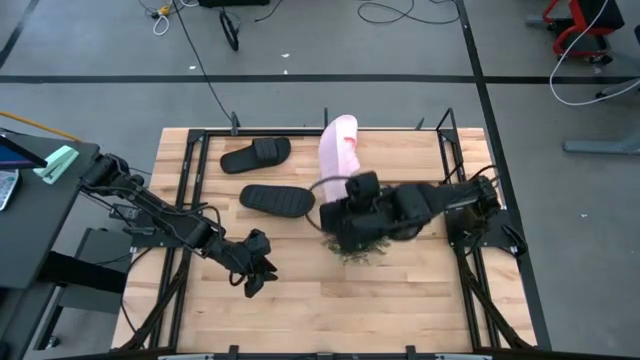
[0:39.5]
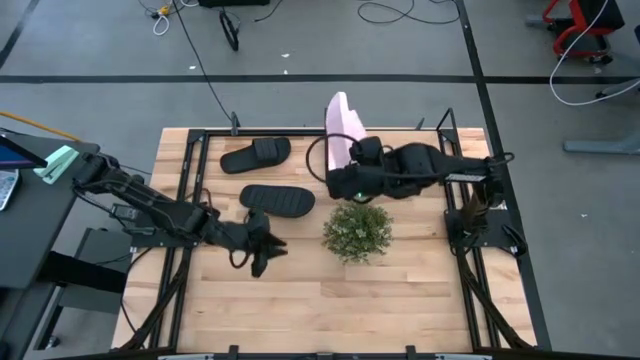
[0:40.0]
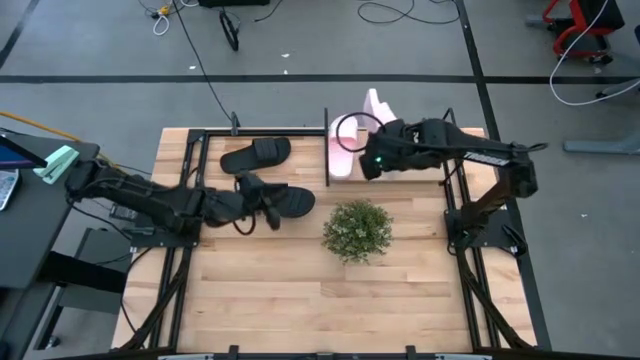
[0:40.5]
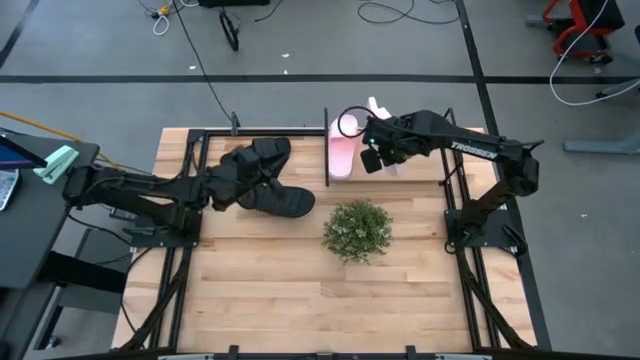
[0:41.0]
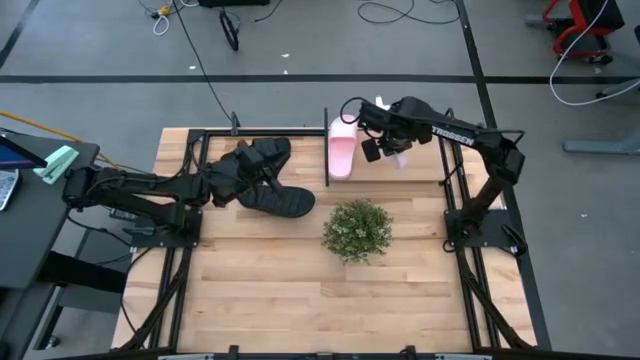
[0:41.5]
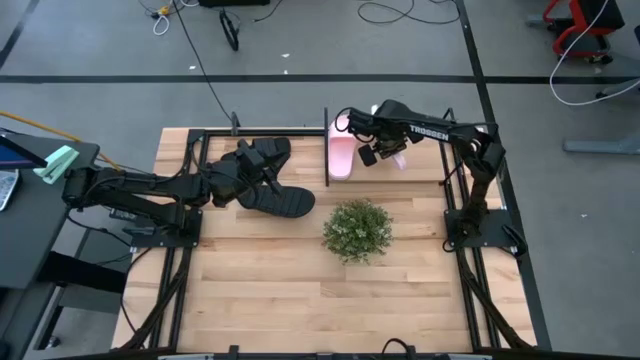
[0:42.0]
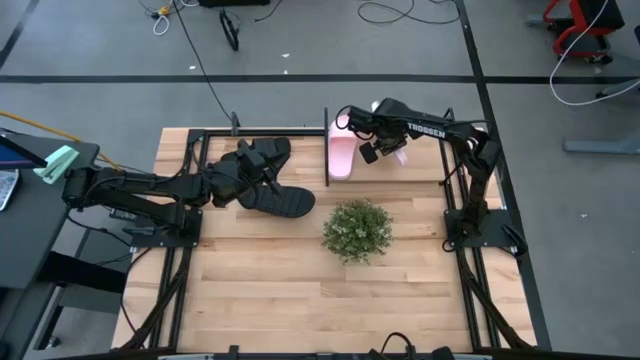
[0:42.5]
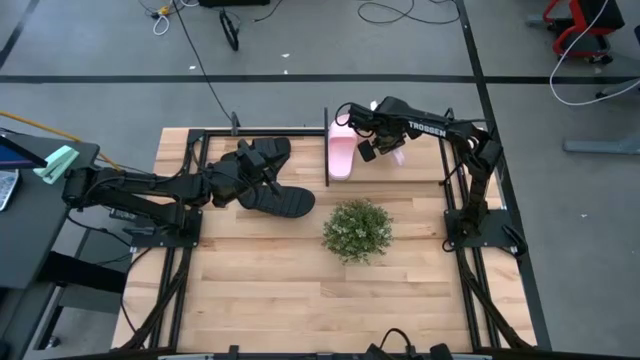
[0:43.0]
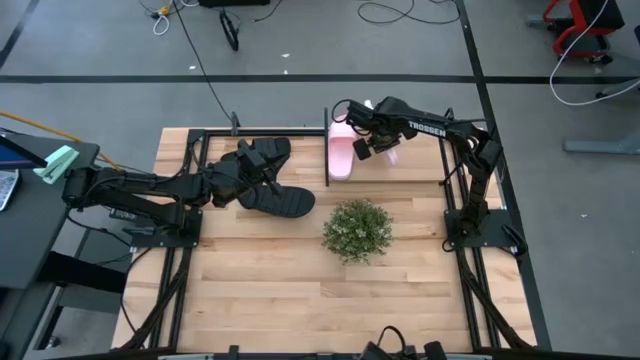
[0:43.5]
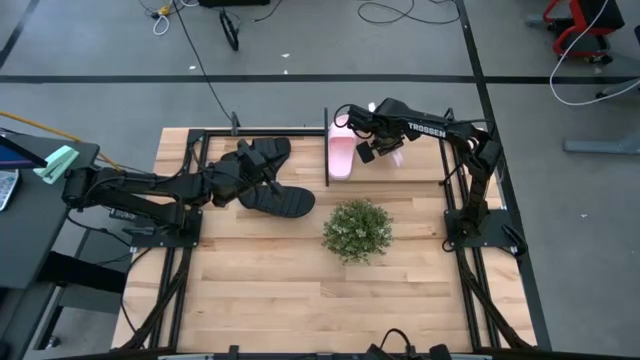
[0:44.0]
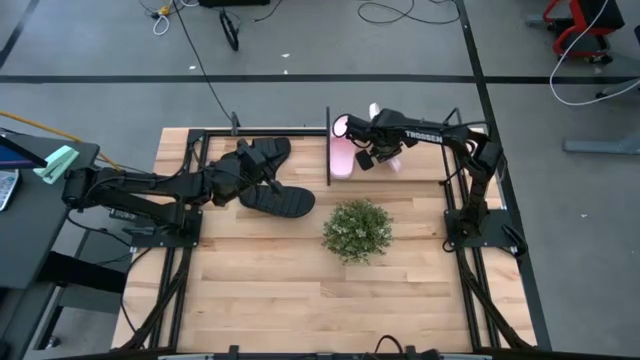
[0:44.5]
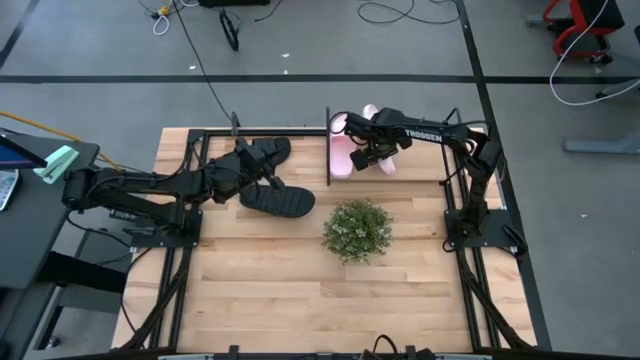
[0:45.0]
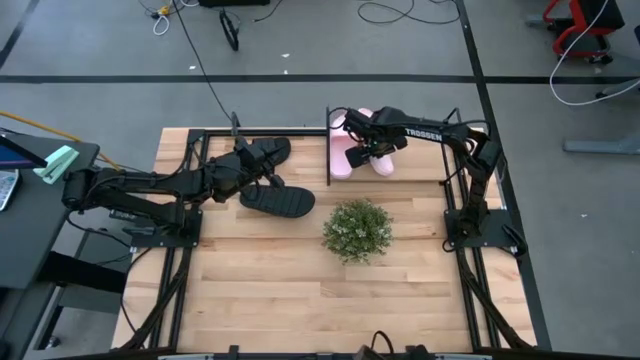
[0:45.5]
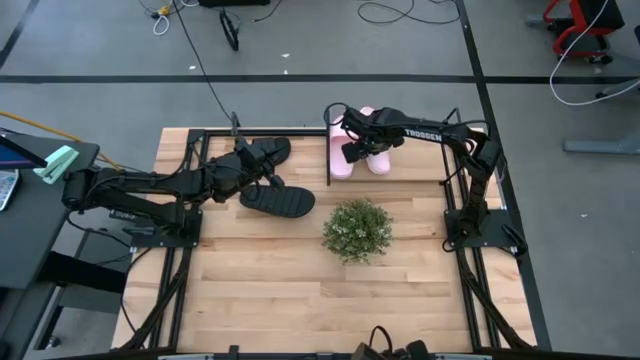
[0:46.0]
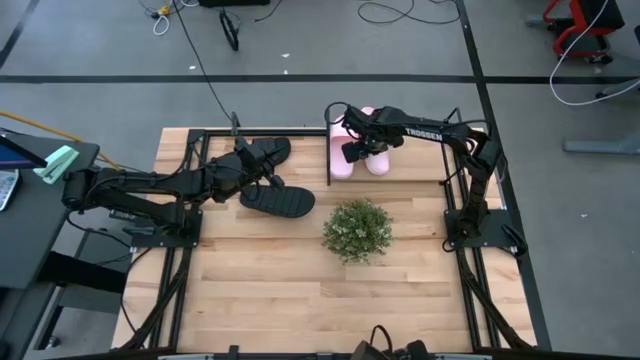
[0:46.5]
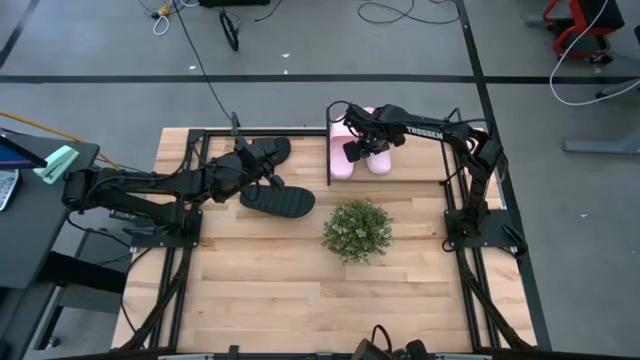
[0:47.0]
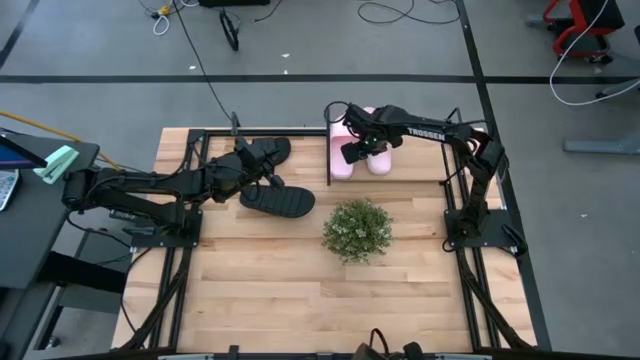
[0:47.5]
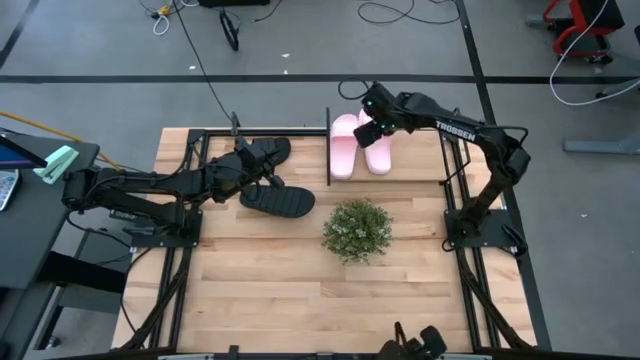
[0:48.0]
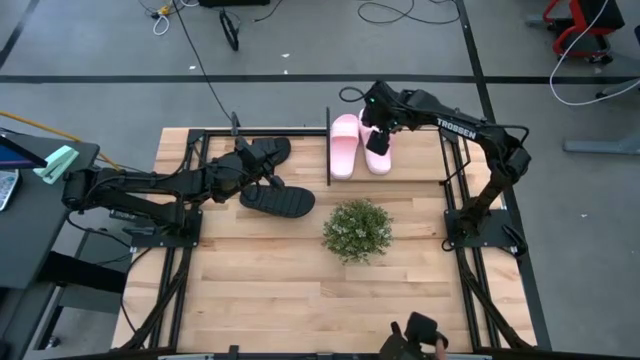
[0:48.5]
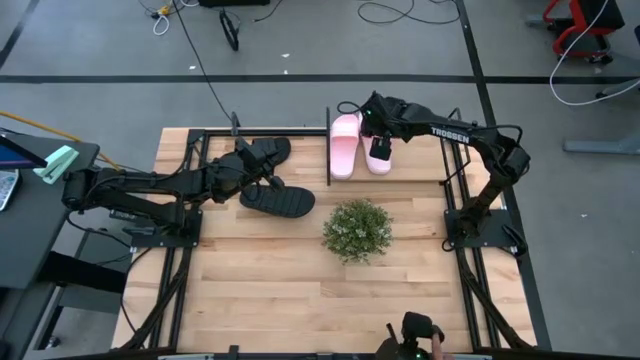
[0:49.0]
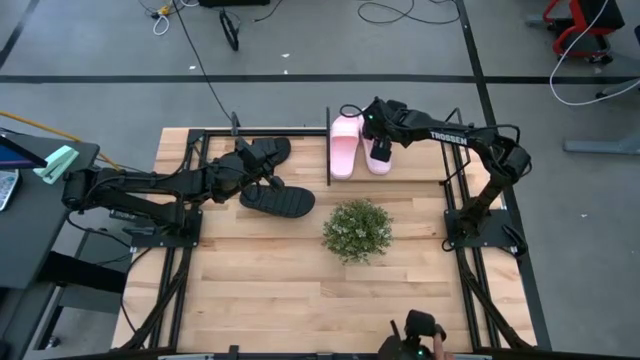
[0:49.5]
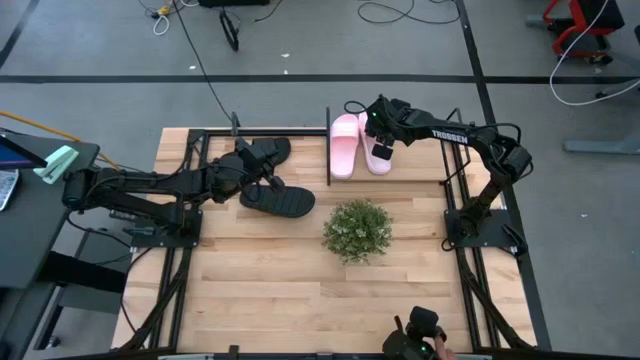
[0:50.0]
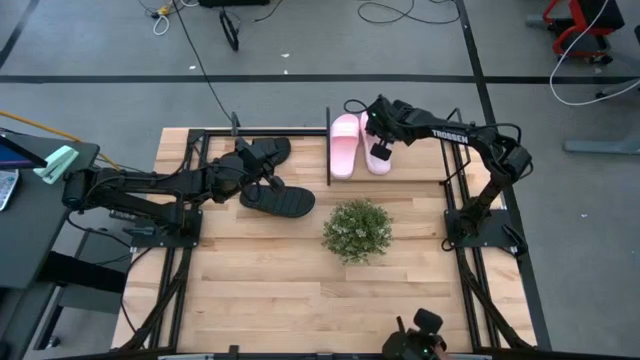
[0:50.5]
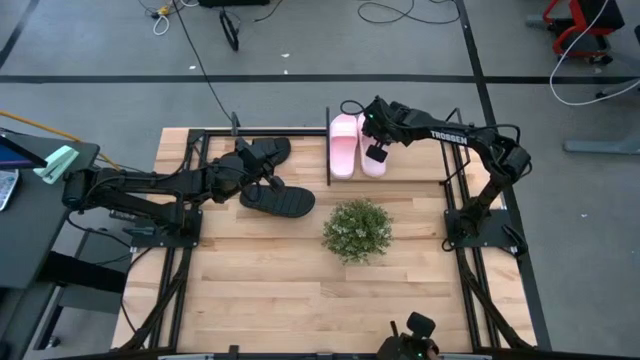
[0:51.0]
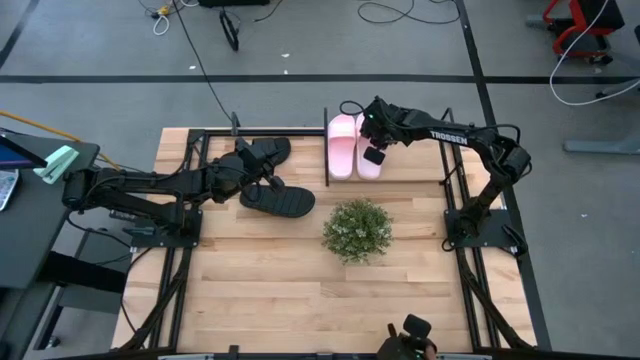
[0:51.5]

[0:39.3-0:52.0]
Task: Pick and place slides into the shelf
Put the pink slide on the shelf

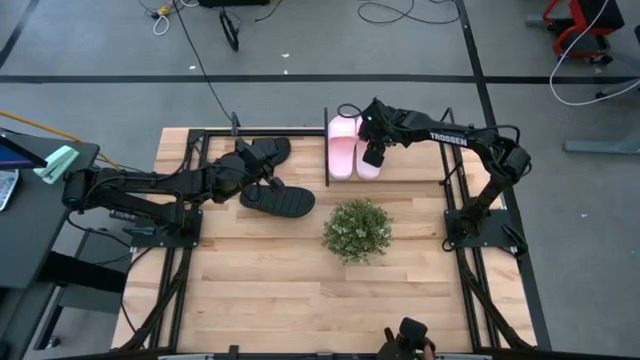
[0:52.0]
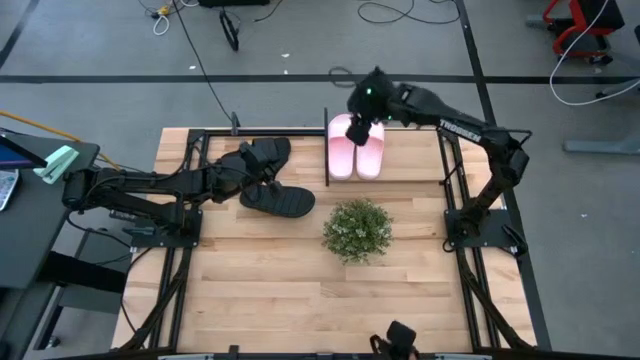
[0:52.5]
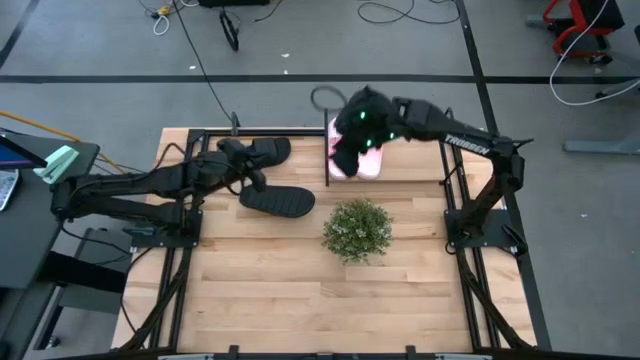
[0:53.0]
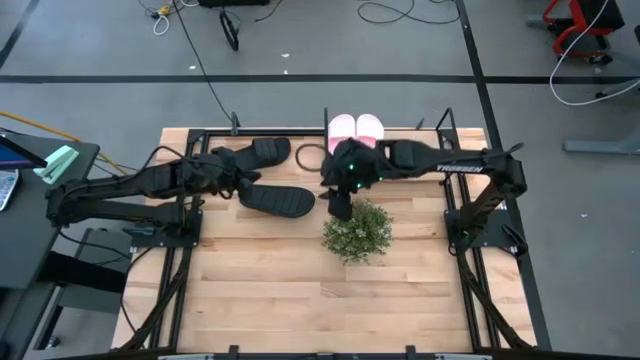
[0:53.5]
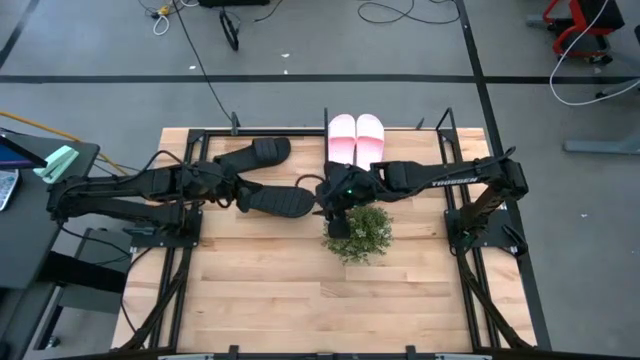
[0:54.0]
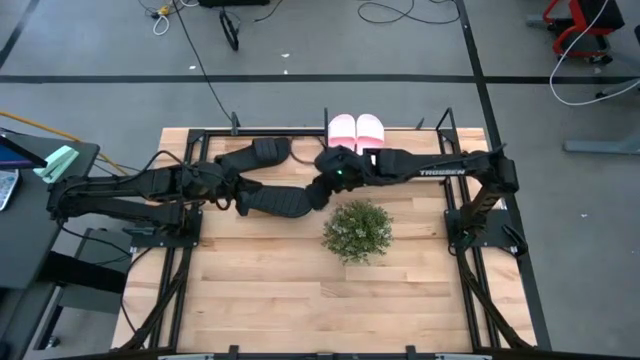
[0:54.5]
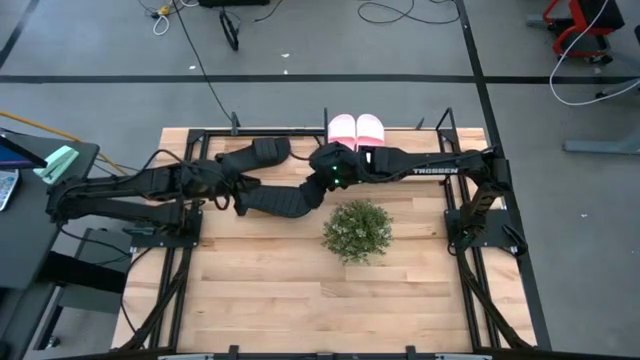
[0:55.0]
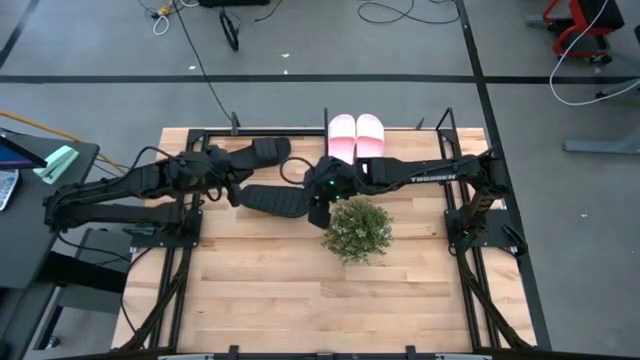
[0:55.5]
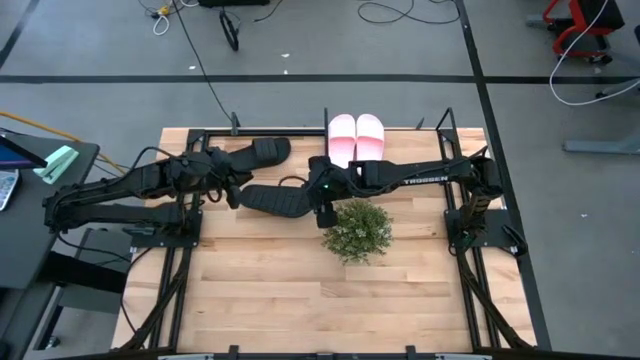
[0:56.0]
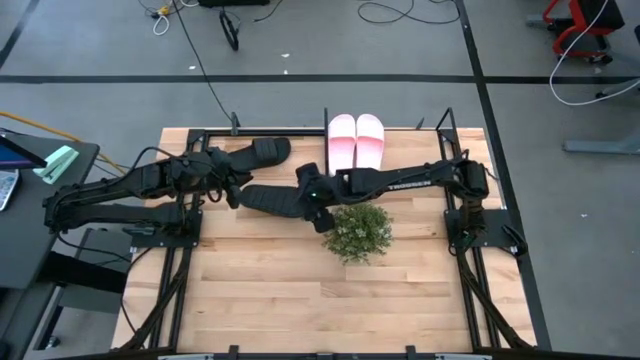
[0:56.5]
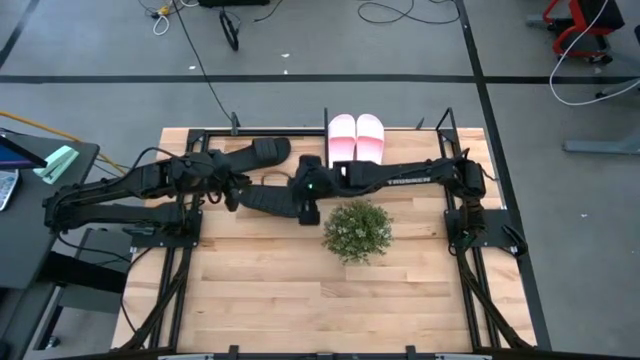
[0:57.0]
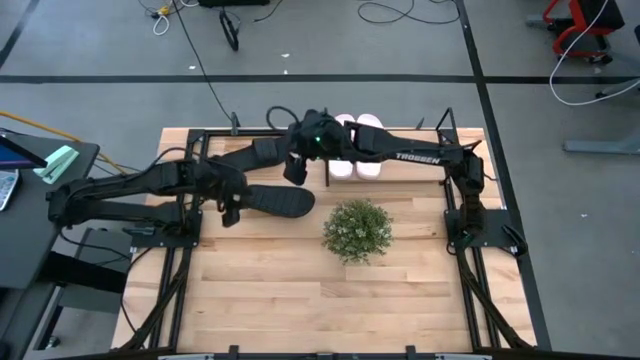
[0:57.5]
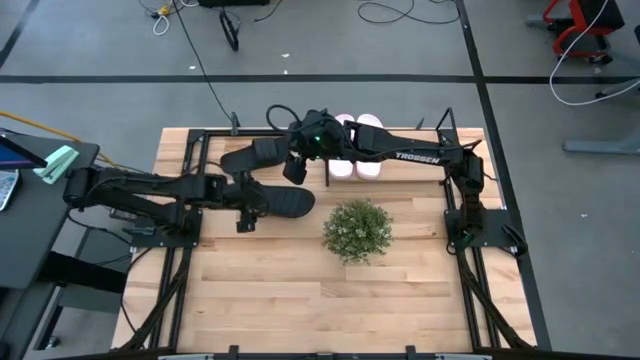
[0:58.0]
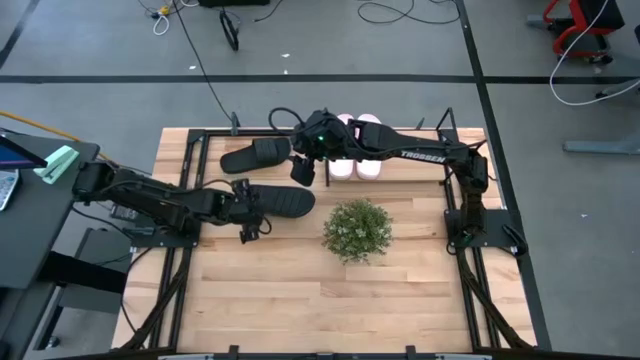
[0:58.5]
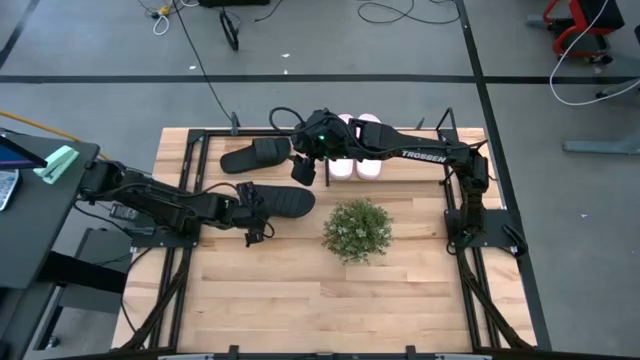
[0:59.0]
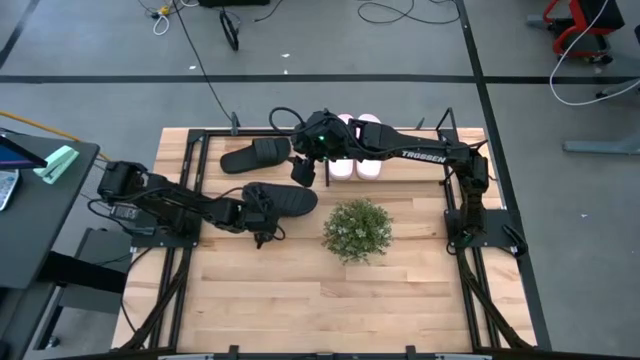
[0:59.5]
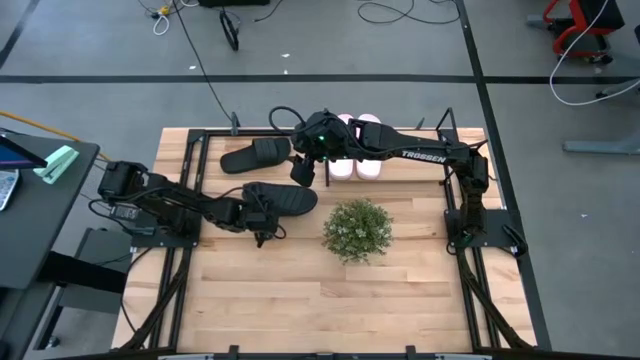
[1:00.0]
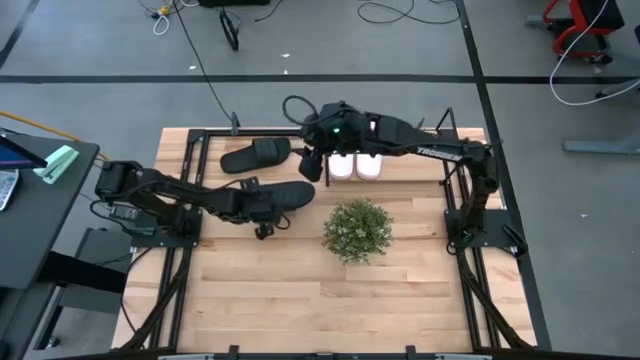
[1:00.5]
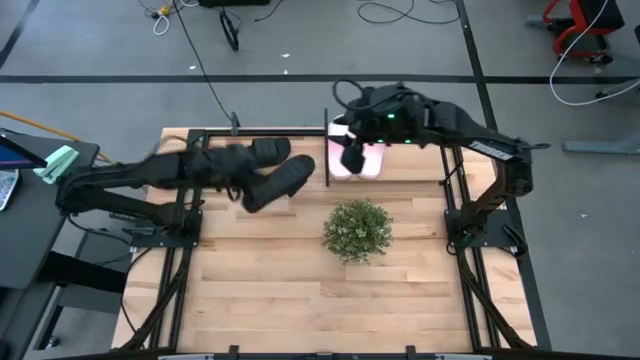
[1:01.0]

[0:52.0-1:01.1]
Put the bottom black slide on the shelf
